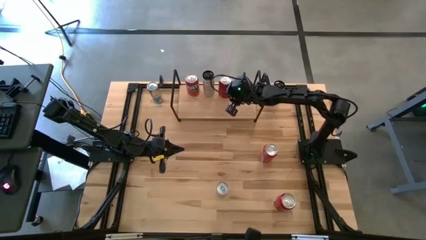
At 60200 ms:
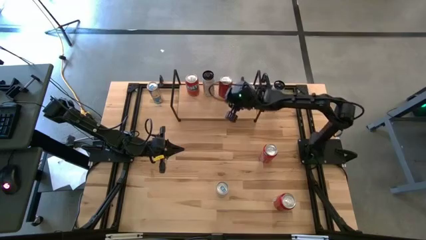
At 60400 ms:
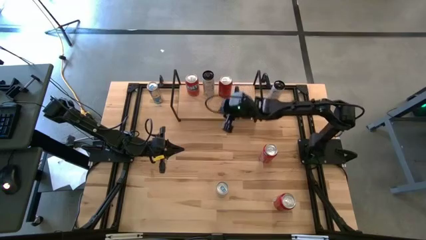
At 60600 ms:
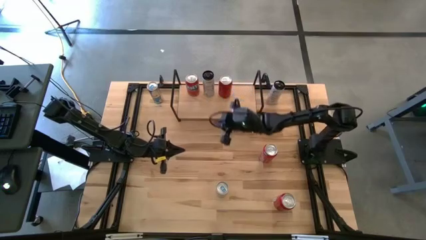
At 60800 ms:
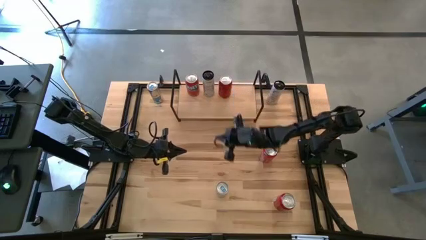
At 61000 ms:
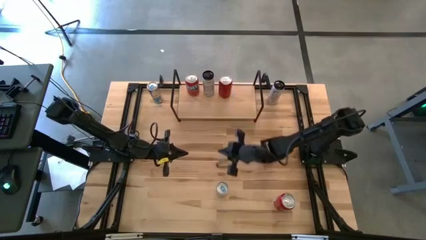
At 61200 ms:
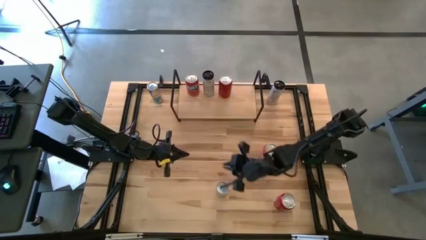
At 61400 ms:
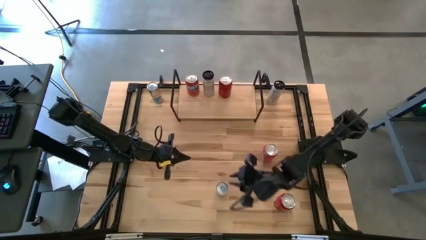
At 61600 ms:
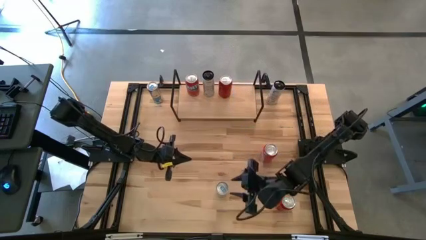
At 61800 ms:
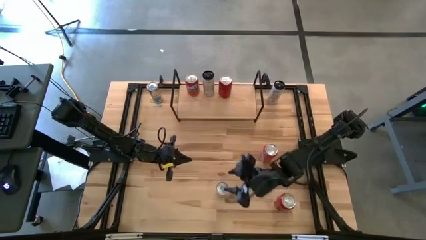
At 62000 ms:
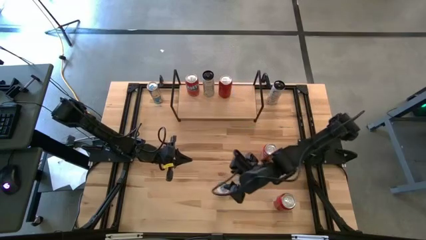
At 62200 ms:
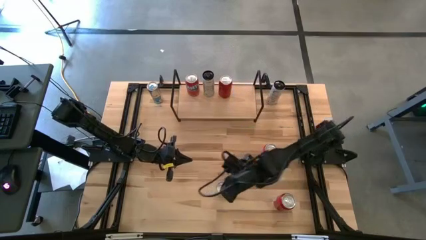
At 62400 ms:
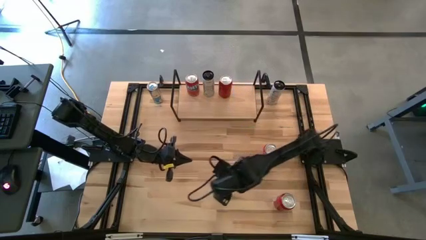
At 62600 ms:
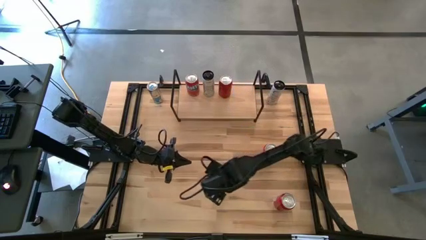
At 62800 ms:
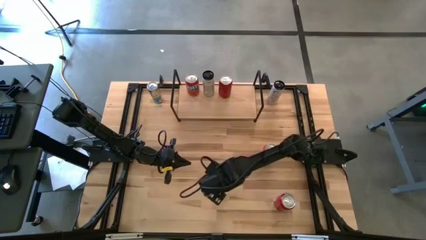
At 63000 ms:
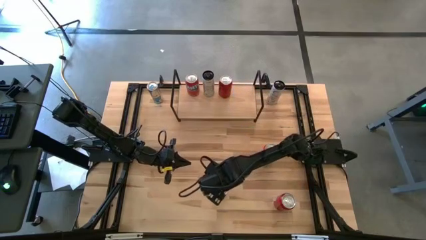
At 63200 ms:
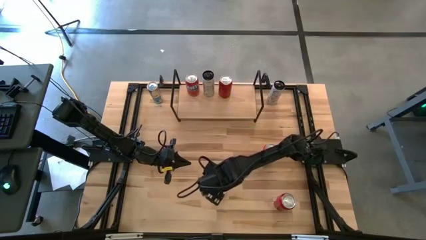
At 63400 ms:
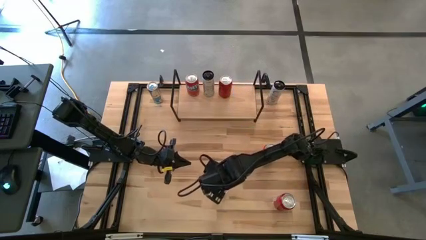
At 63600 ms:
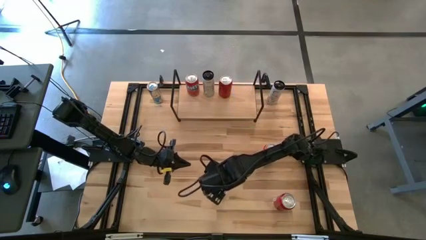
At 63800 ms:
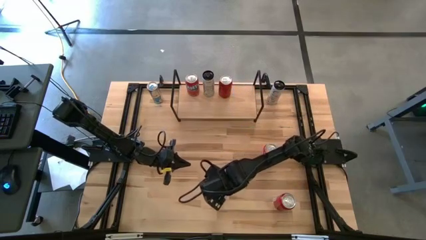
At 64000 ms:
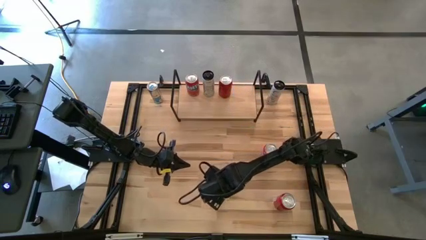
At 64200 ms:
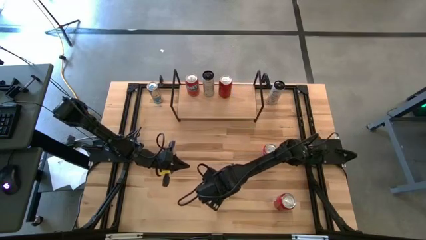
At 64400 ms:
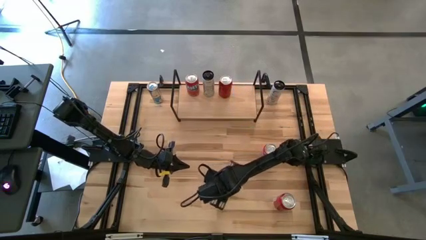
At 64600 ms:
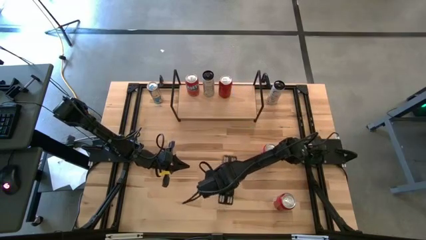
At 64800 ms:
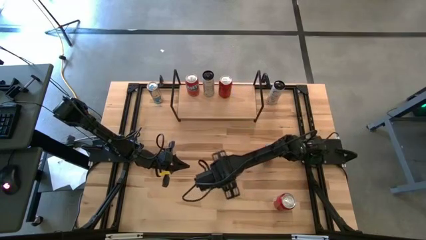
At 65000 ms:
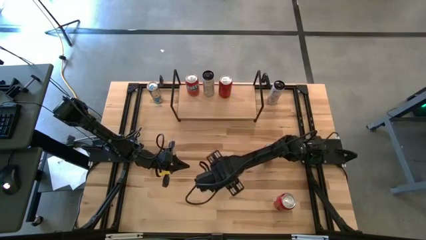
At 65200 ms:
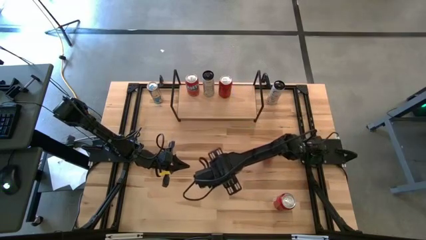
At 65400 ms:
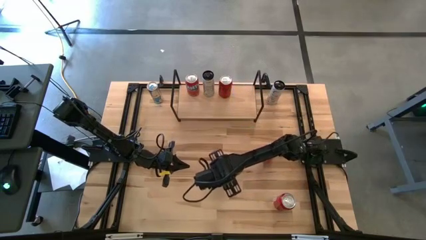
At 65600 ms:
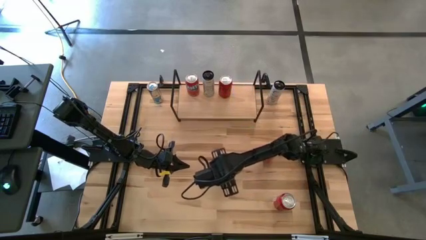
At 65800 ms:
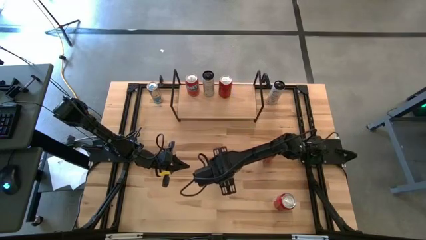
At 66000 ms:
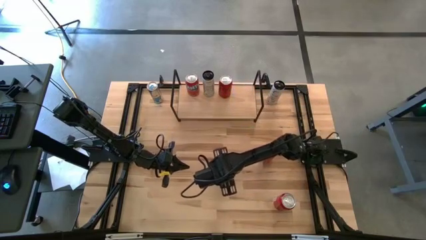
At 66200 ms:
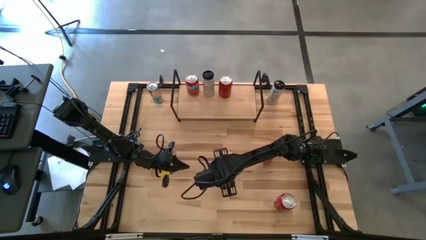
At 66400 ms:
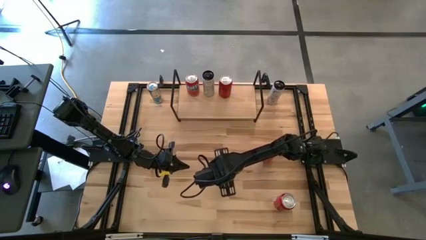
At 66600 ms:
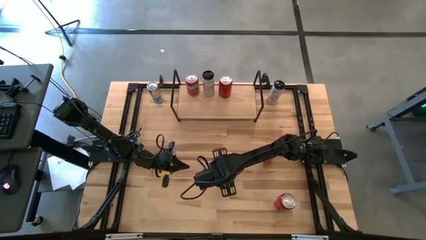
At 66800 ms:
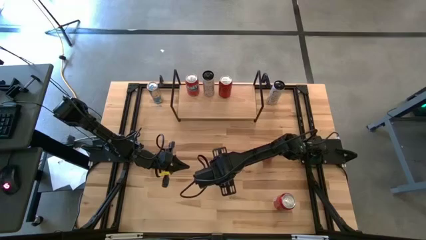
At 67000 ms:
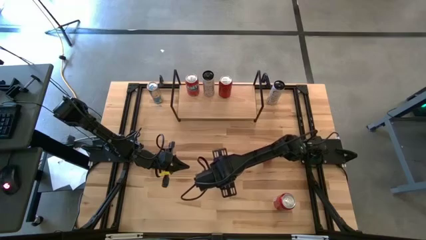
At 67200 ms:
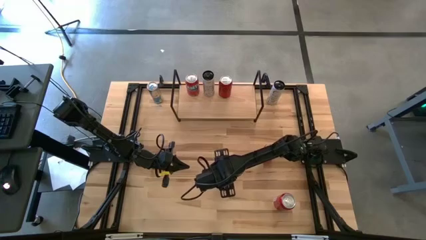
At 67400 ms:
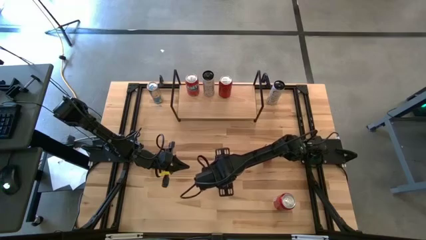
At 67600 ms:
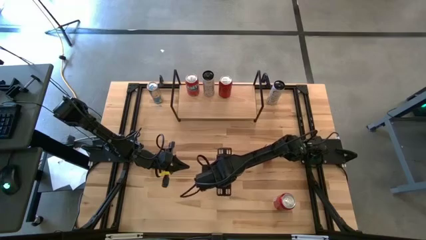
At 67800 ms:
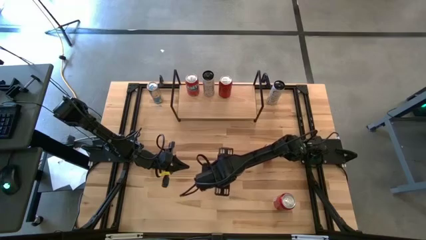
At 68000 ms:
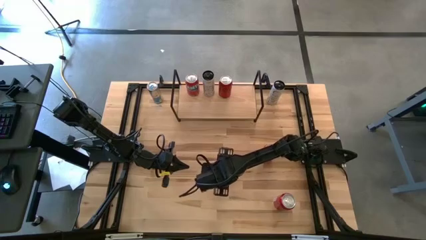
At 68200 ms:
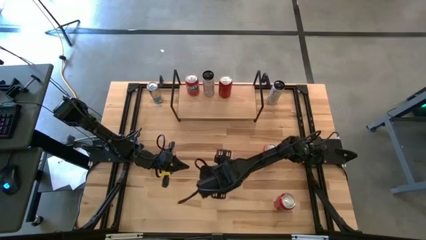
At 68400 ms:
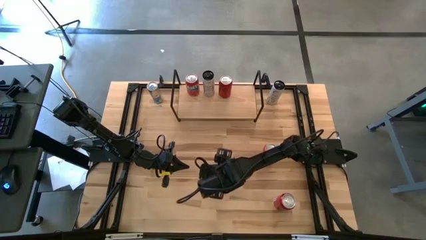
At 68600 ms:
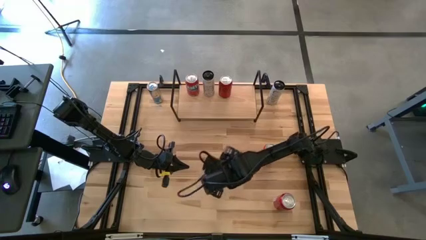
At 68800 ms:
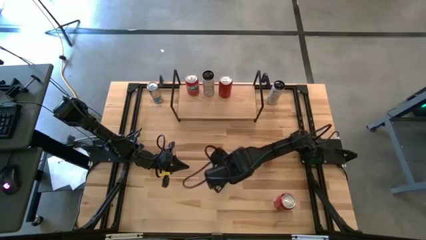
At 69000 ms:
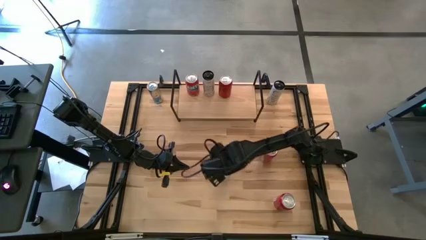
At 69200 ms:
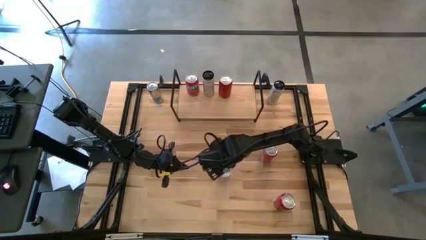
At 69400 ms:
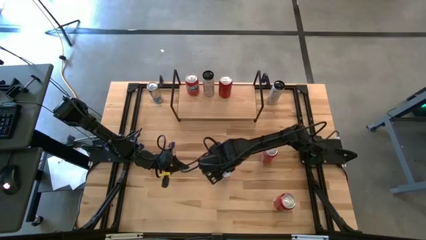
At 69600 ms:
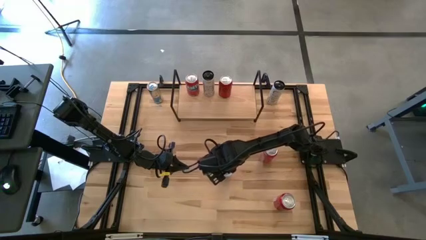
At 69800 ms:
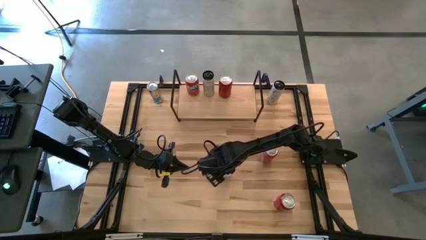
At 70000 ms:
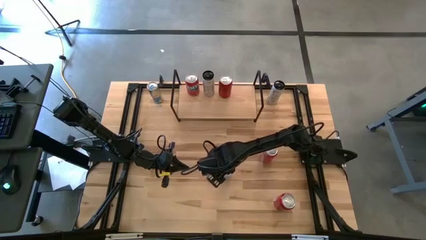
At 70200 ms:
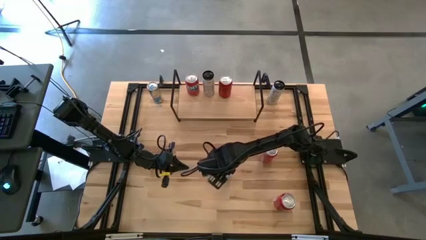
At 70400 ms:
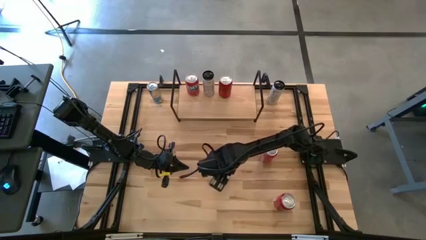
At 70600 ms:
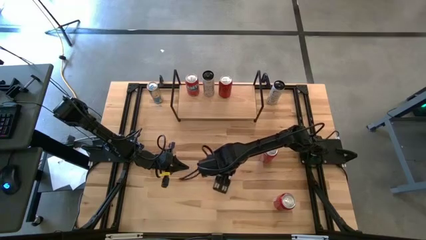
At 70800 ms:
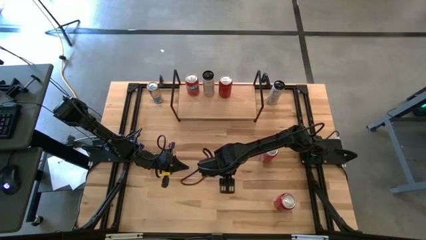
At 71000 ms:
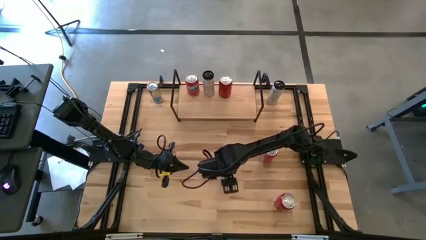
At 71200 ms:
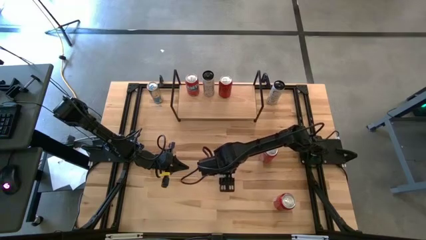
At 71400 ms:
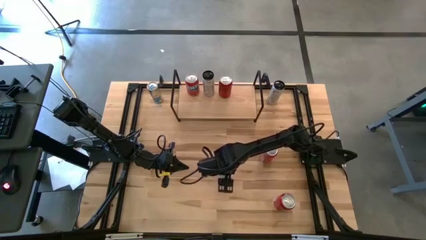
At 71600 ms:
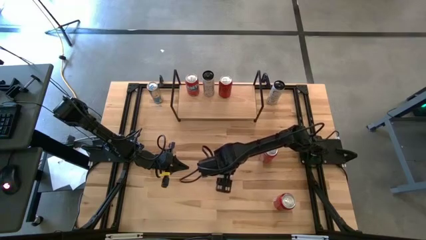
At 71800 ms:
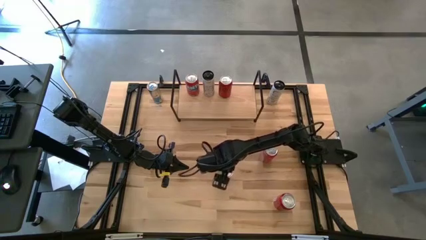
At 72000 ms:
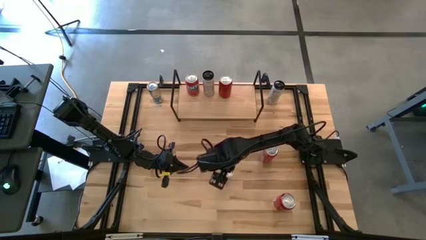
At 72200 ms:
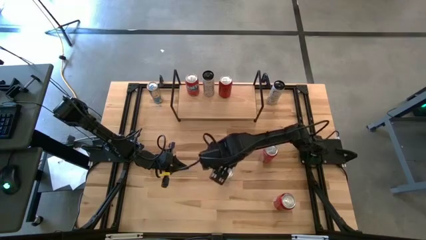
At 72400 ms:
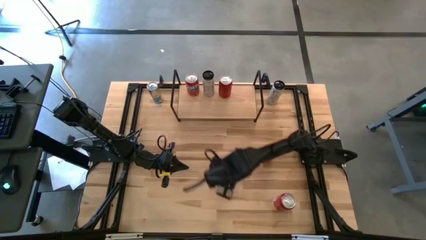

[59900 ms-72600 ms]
Task: Place canned beverage on shelf
Put the bottom blue soda can on the shelf
